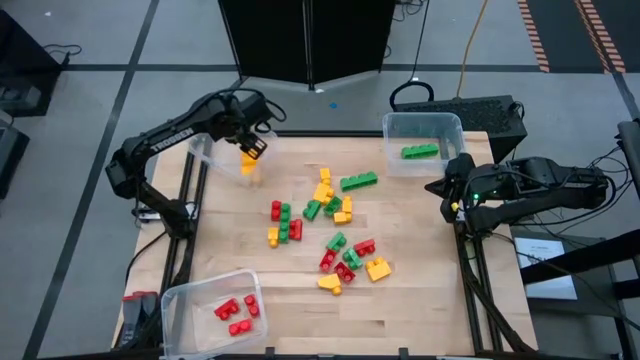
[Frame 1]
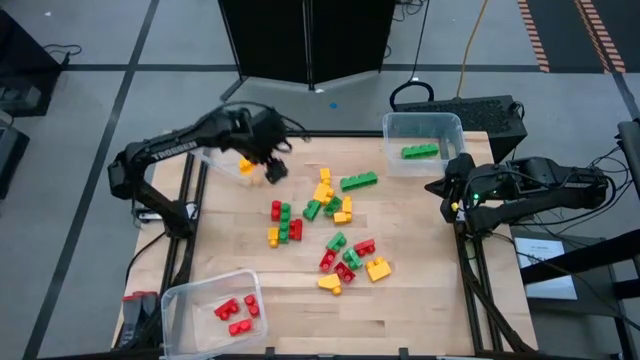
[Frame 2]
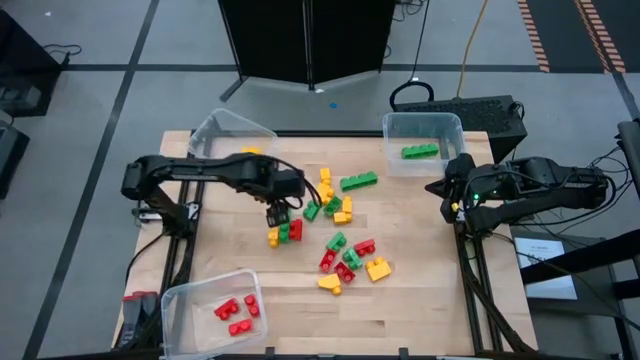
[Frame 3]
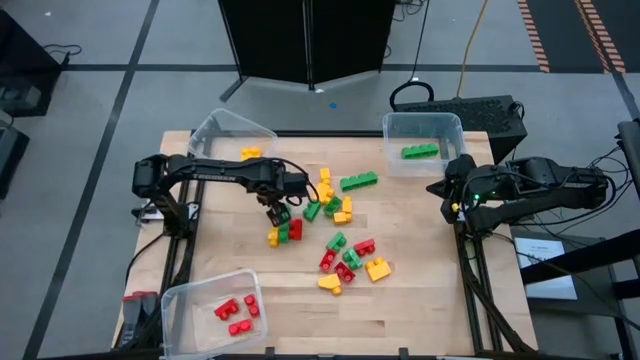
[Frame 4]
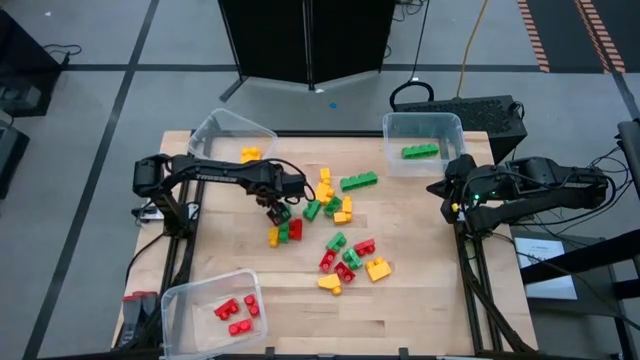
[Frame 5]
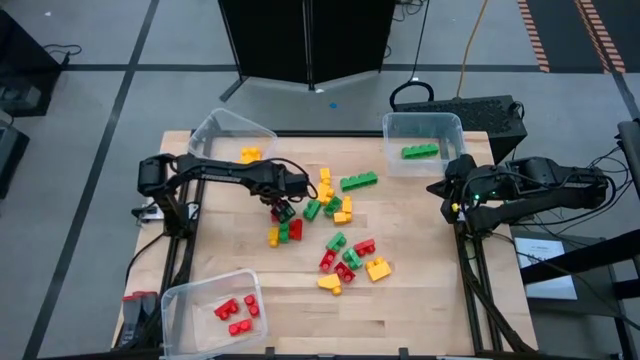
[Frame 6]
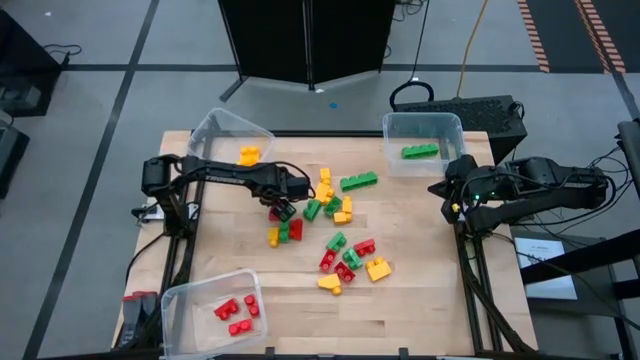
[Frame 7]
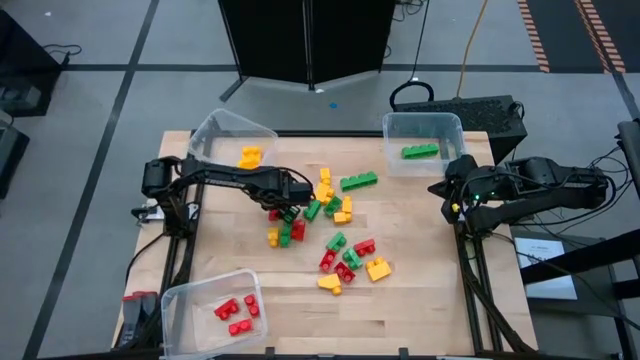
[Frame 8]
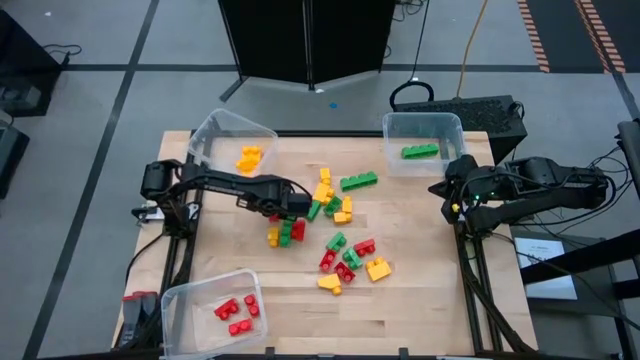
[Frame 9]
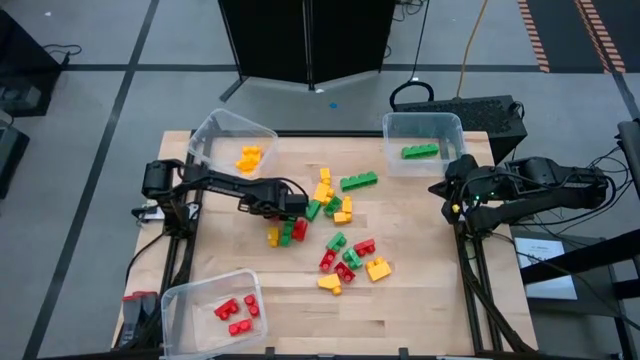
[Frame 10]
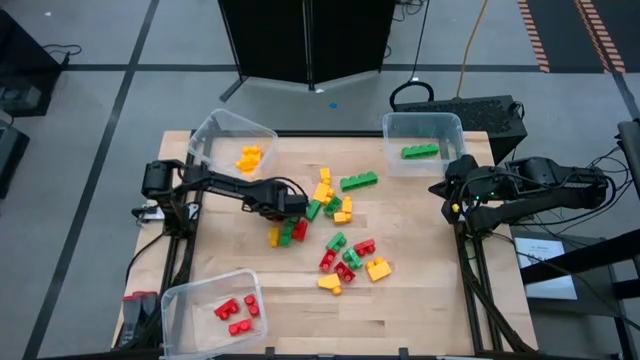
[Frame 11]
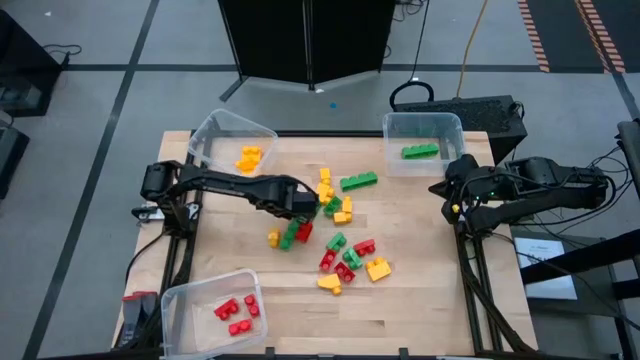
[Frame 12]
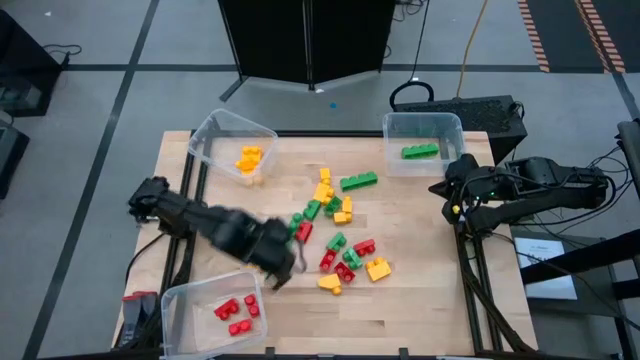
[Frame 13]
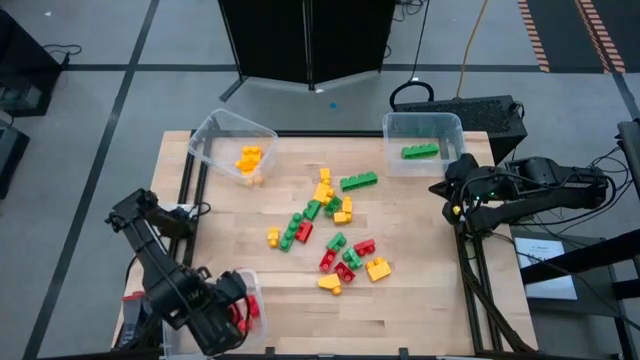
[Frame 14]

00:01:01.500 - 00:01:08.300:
Task: Sort blocks
Put the red game piece into the bottom transparent bin

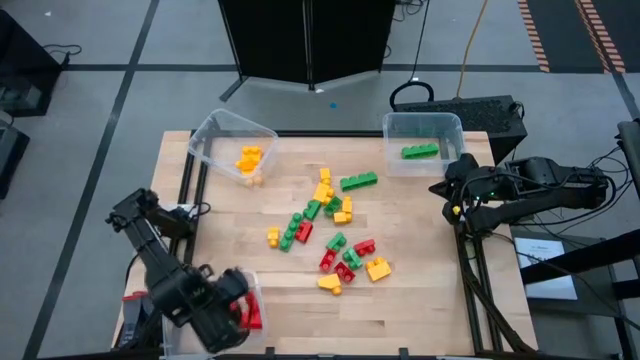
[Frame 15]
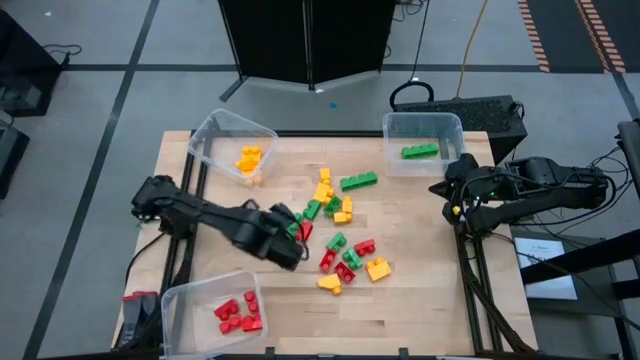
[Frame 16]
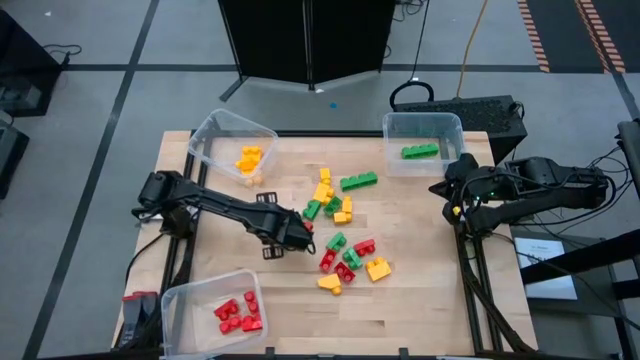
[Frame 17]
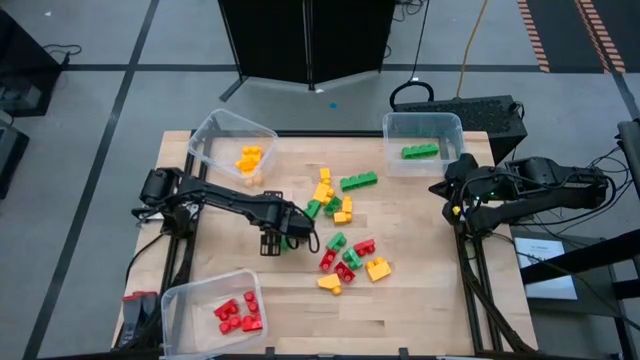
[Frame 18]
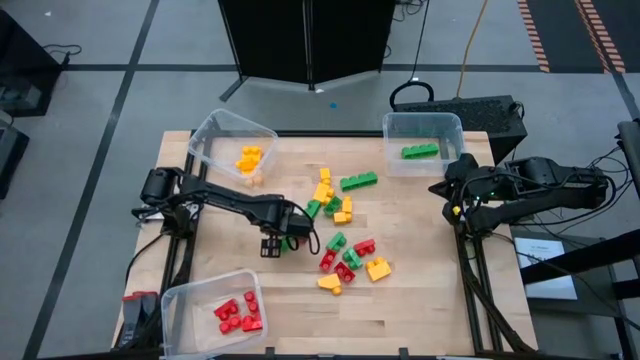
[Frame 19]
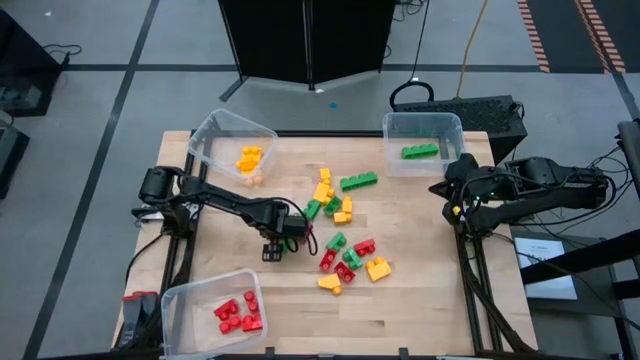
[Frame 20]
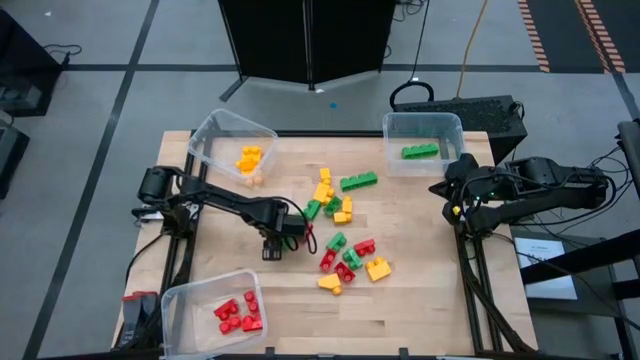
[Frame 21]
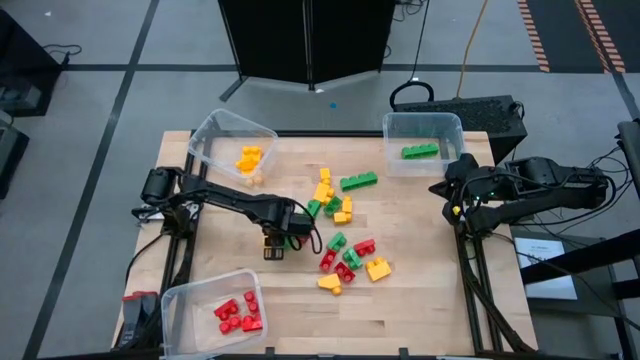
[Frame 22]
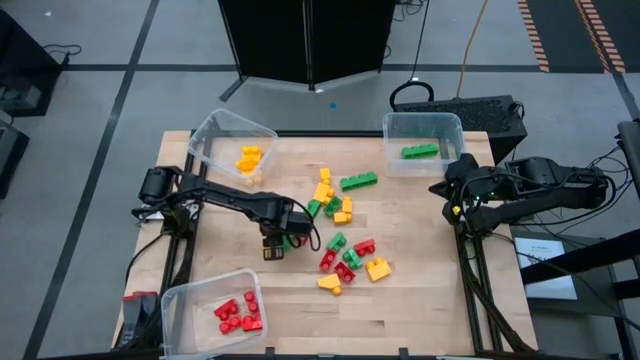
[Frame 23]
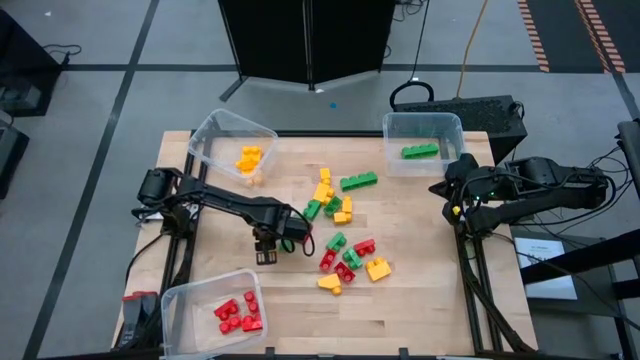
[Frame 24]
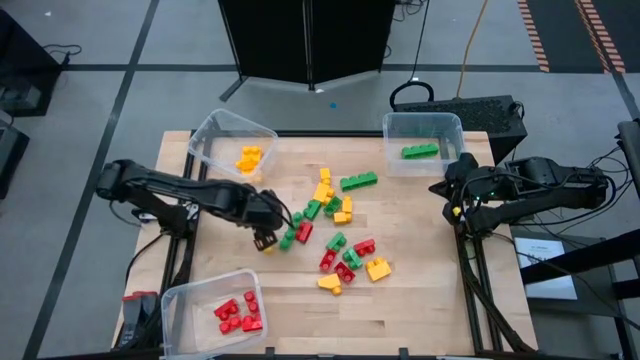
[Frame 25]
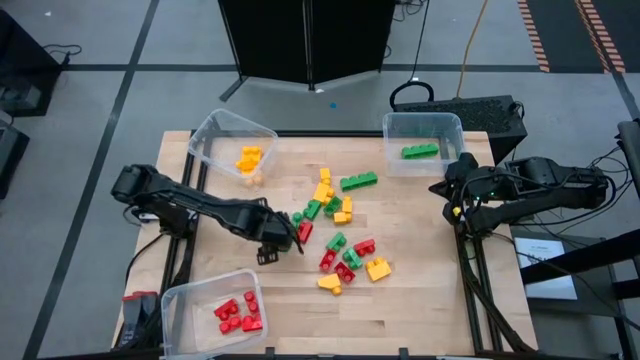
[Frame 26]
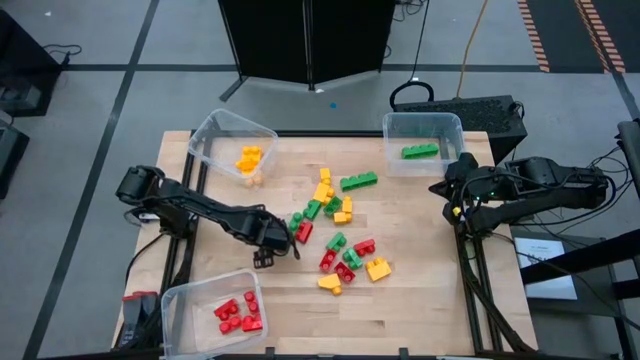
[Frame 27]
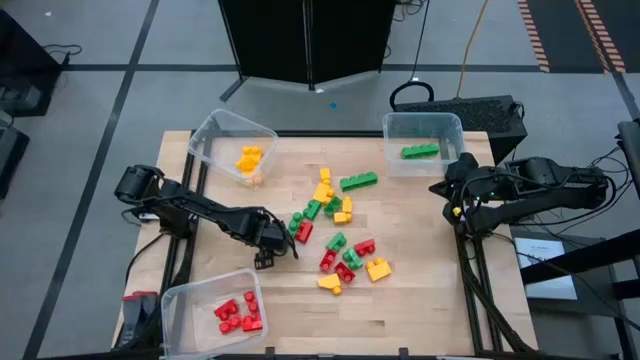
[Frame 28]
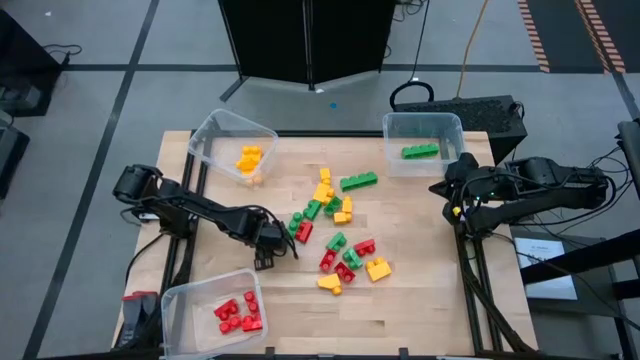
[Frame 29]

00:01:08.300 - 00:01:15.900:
Put the yellow game piece into the top left transparent bin

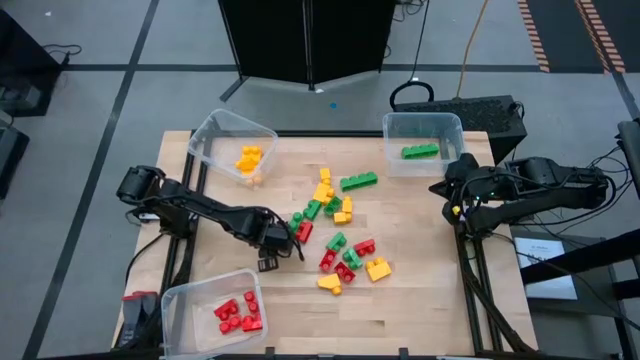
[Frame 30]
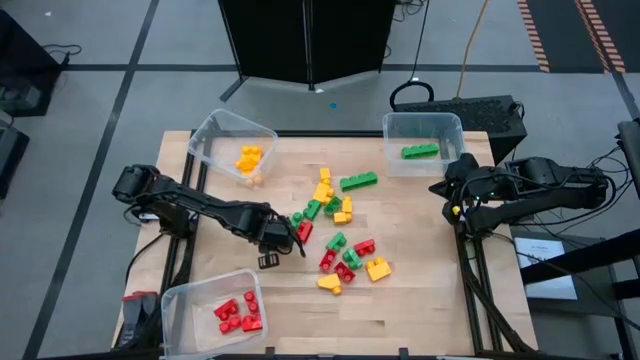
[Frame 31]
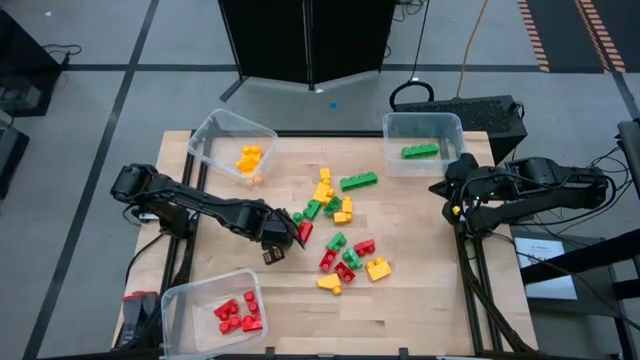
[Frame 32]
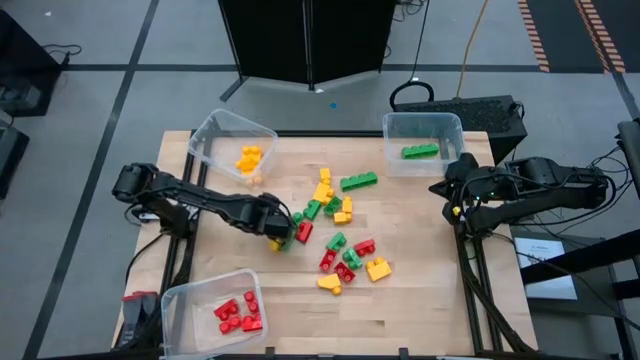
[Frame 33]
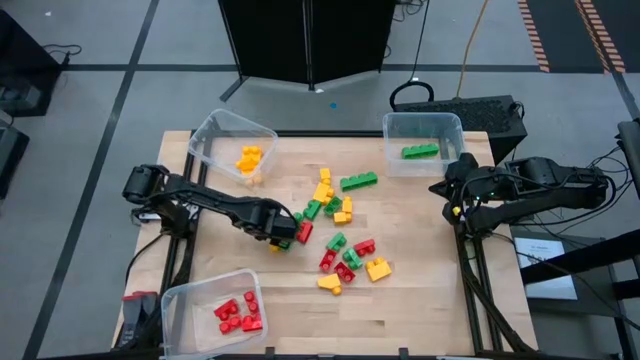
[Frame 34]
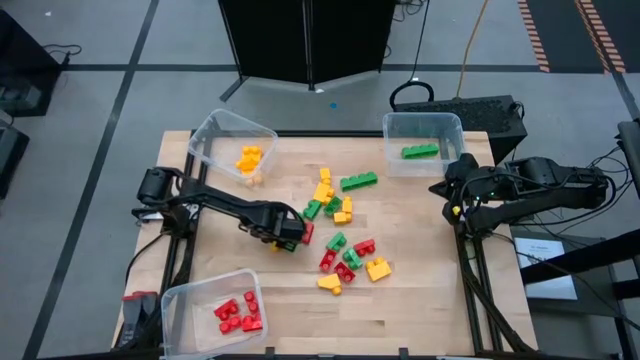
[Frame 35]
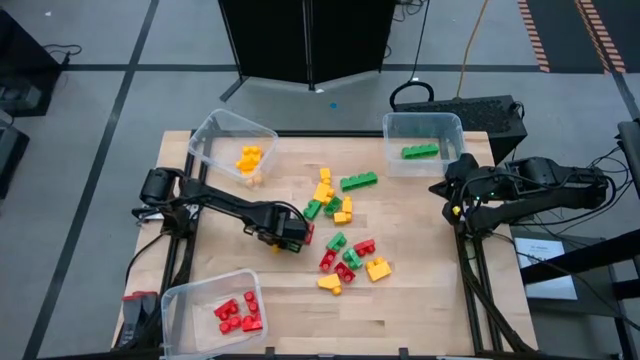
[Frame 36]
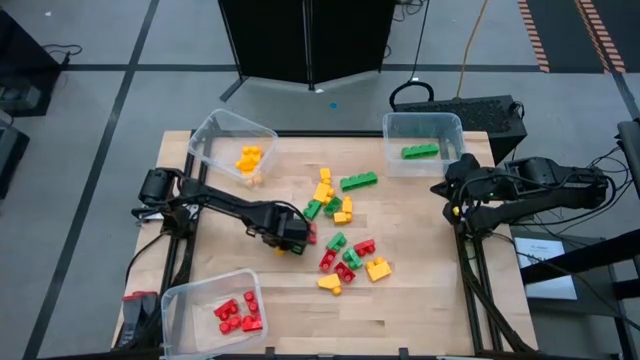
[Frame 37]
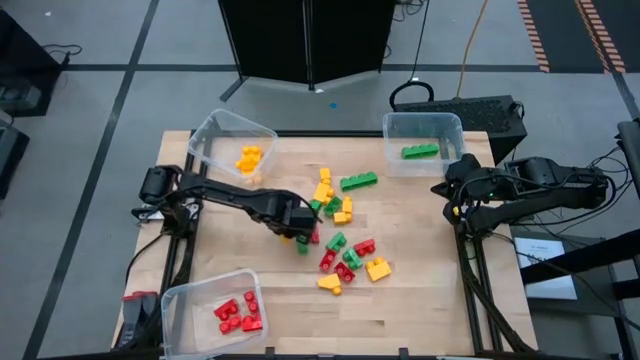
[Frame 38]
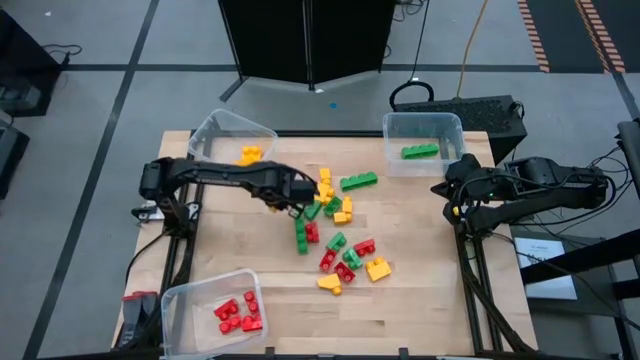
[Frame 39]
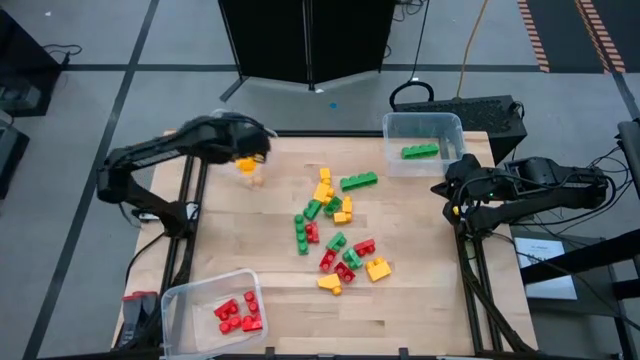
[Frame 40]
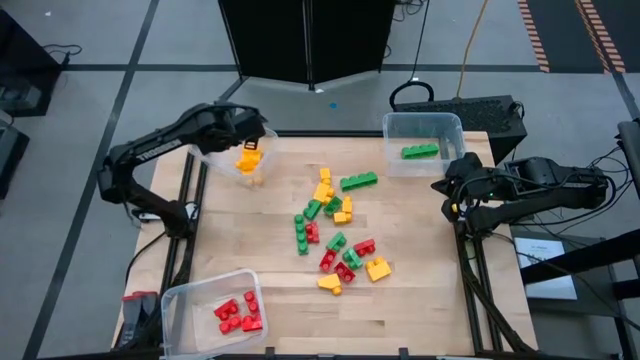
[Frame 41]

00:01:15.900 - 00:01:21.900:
Put the yellow game piece into the top left transparent bin
